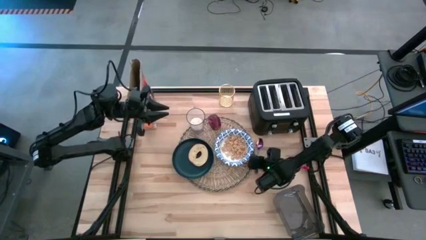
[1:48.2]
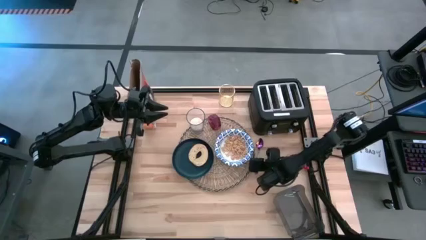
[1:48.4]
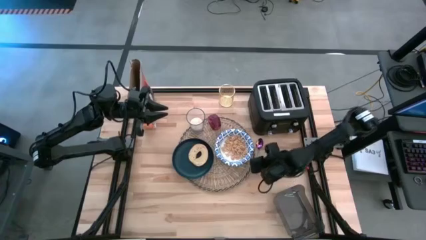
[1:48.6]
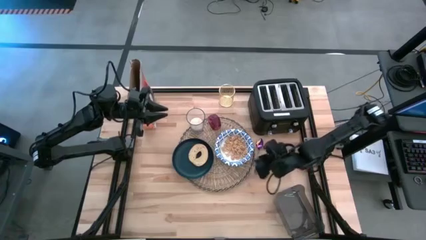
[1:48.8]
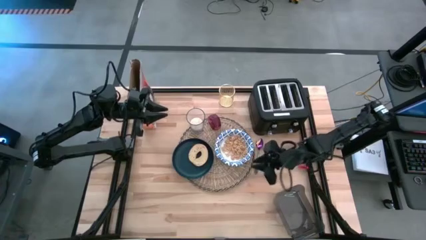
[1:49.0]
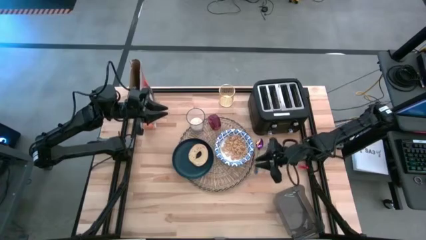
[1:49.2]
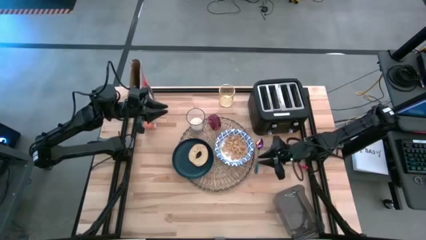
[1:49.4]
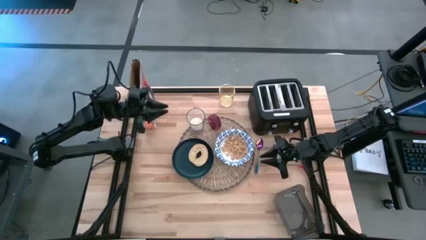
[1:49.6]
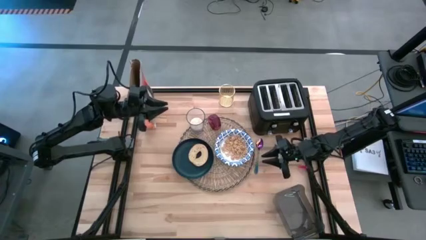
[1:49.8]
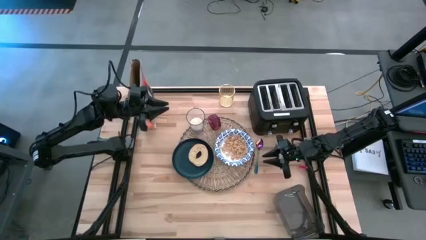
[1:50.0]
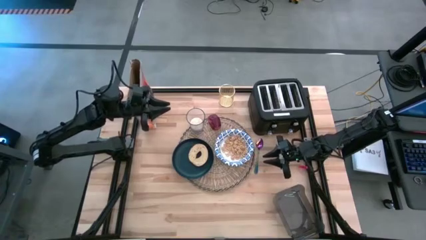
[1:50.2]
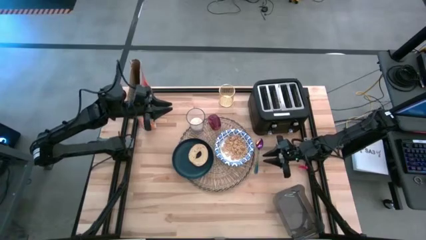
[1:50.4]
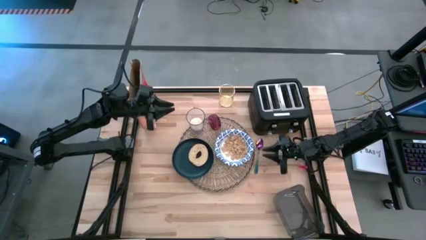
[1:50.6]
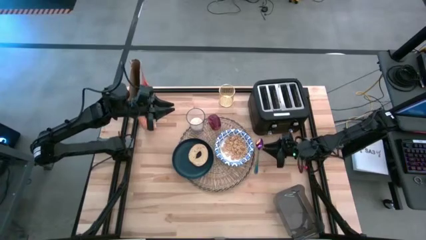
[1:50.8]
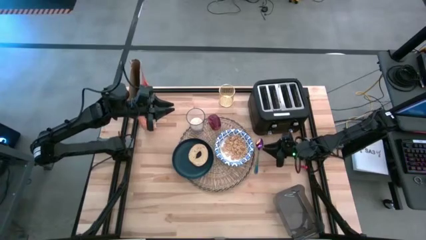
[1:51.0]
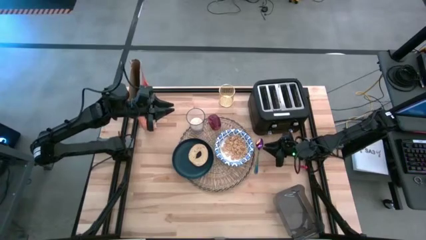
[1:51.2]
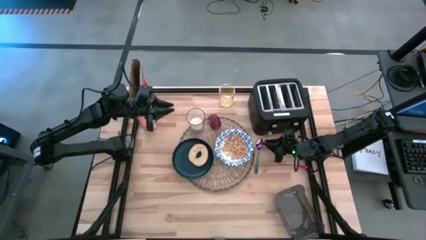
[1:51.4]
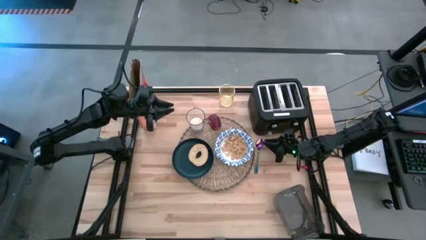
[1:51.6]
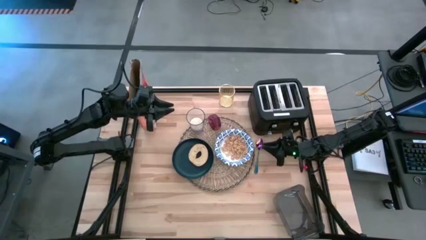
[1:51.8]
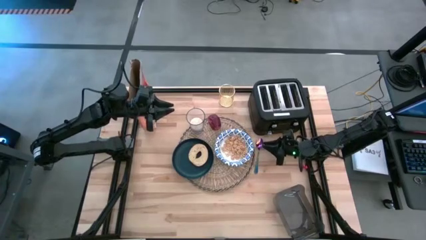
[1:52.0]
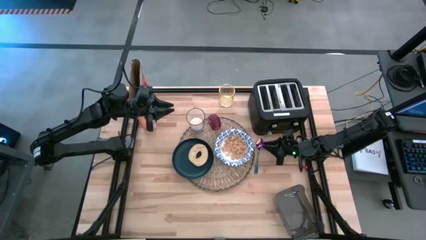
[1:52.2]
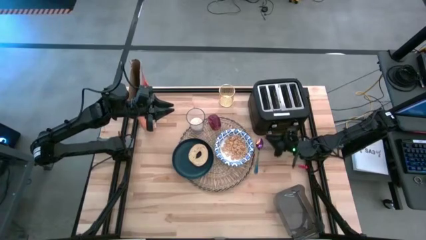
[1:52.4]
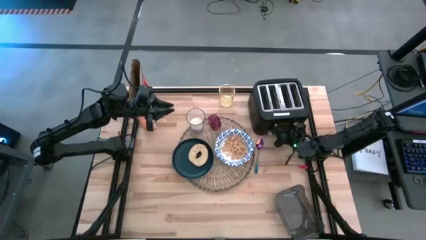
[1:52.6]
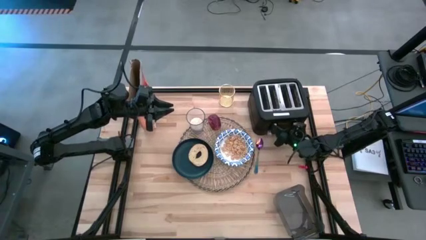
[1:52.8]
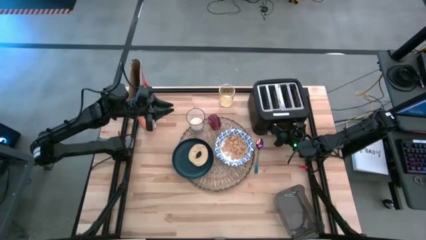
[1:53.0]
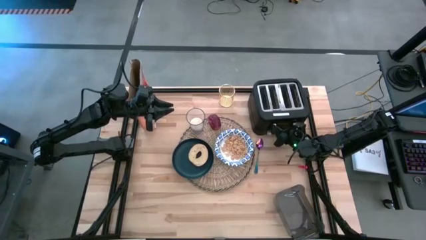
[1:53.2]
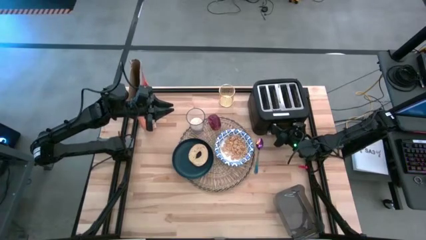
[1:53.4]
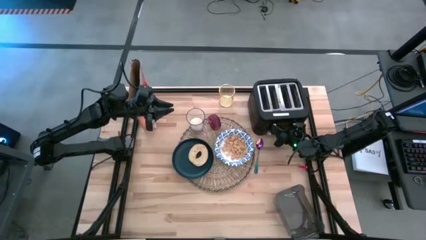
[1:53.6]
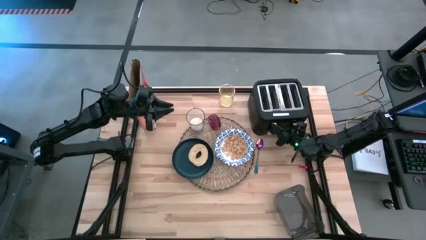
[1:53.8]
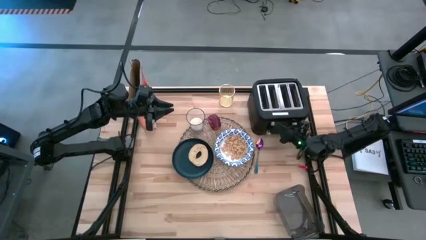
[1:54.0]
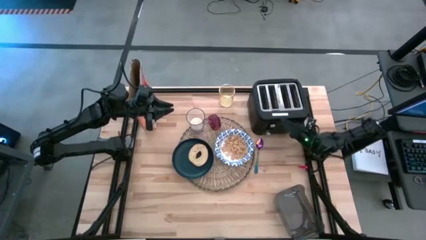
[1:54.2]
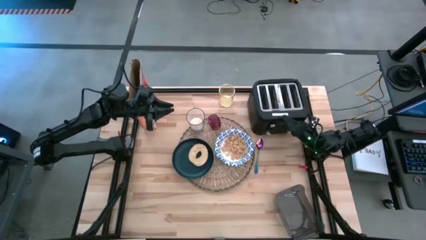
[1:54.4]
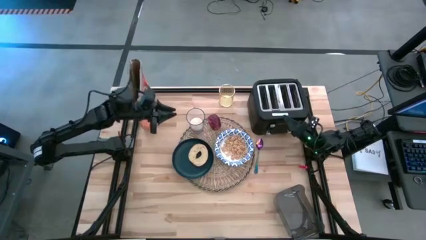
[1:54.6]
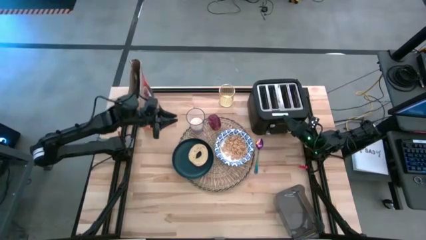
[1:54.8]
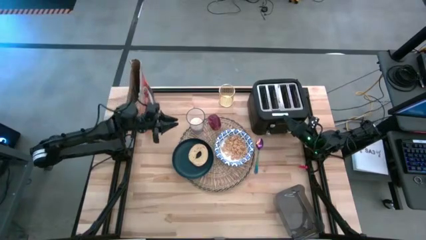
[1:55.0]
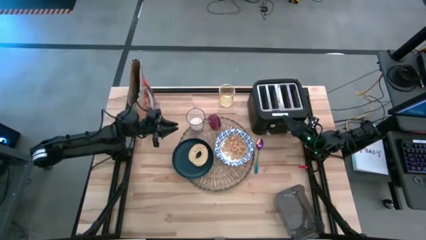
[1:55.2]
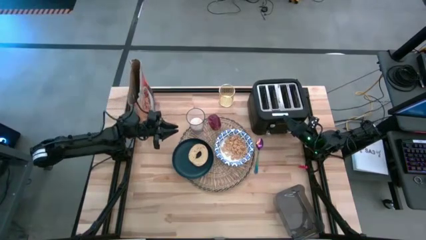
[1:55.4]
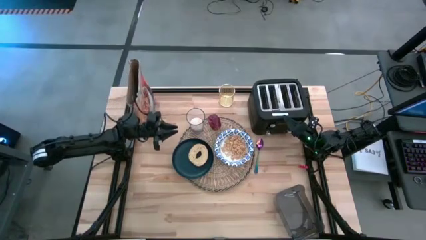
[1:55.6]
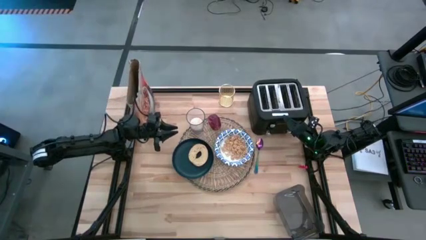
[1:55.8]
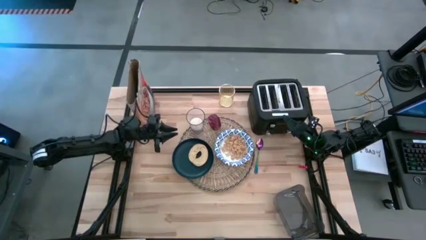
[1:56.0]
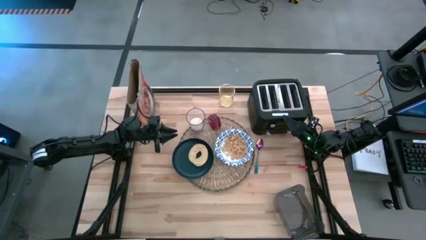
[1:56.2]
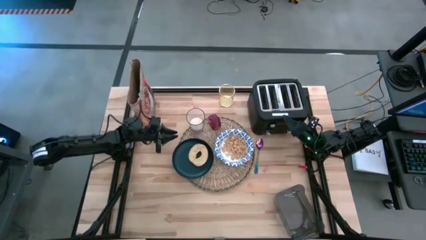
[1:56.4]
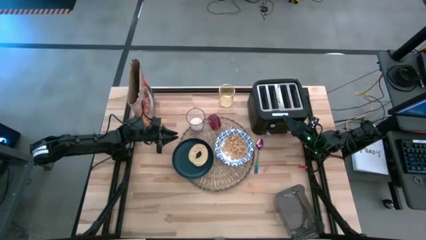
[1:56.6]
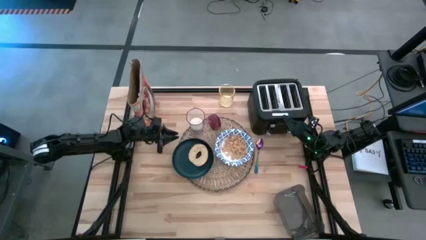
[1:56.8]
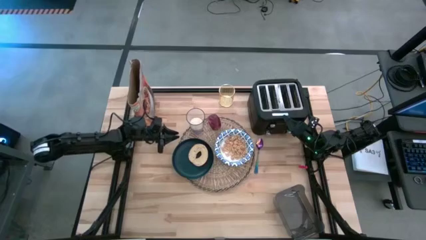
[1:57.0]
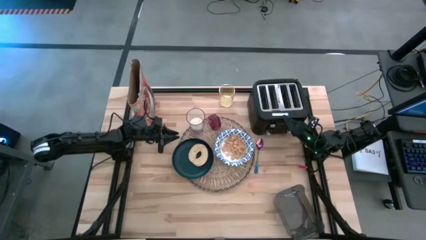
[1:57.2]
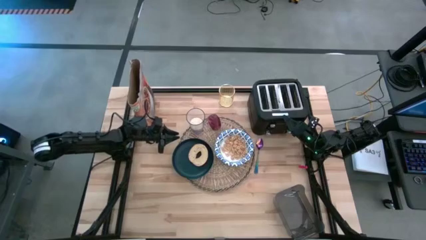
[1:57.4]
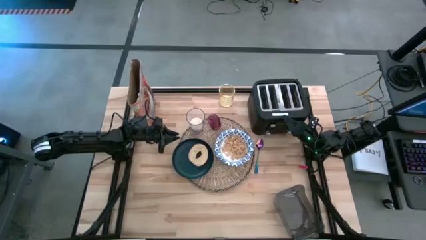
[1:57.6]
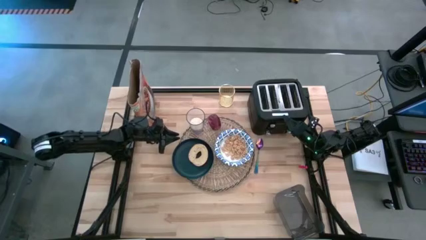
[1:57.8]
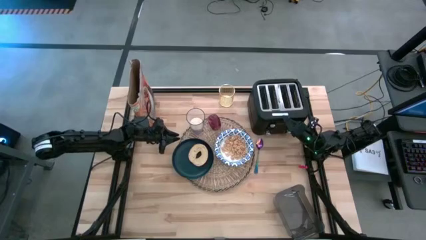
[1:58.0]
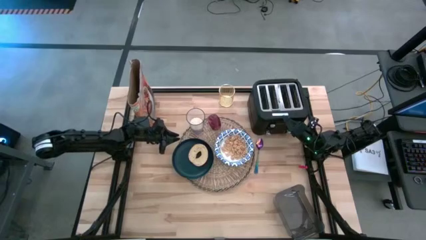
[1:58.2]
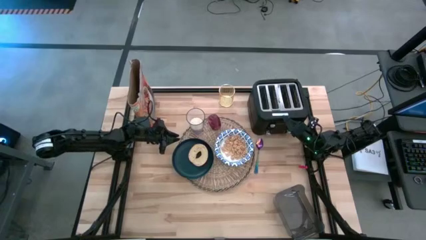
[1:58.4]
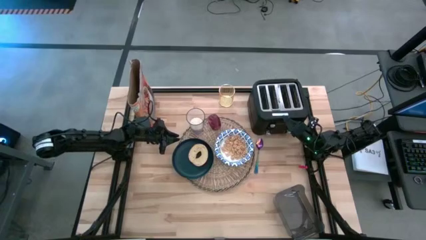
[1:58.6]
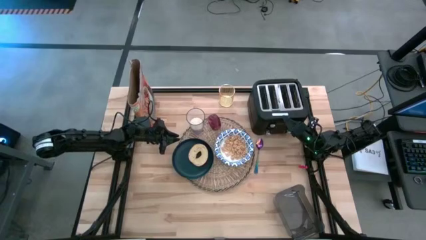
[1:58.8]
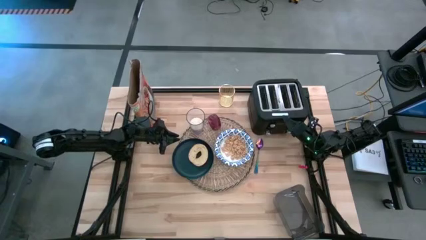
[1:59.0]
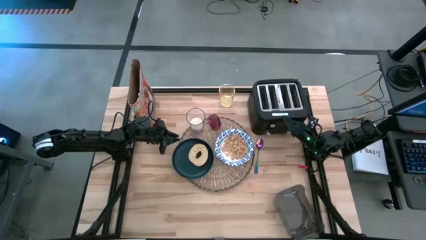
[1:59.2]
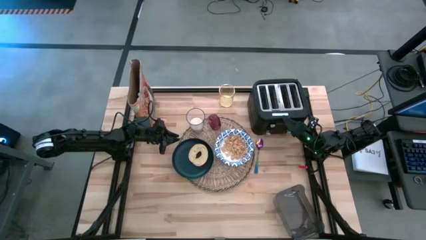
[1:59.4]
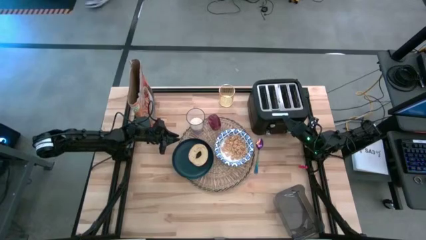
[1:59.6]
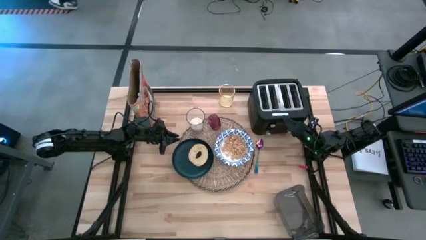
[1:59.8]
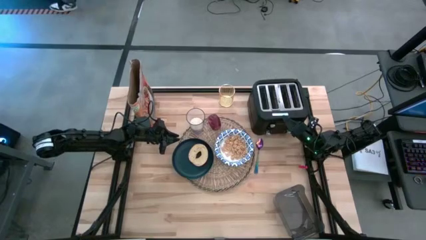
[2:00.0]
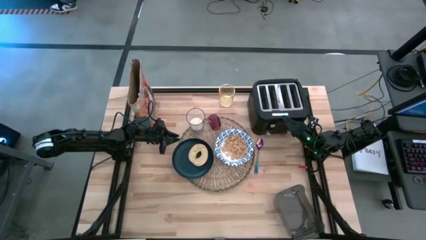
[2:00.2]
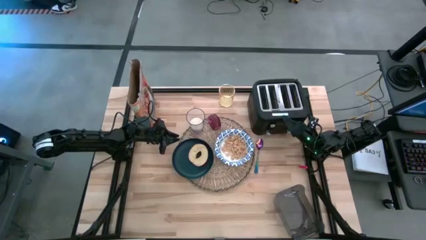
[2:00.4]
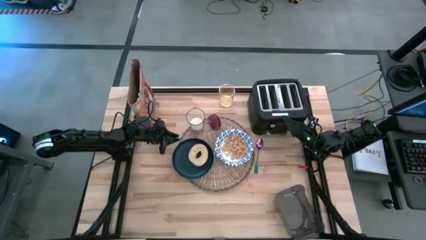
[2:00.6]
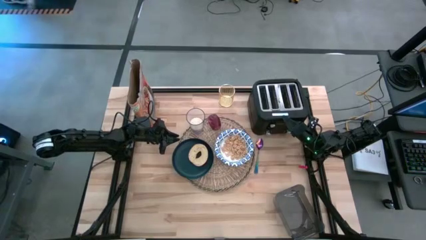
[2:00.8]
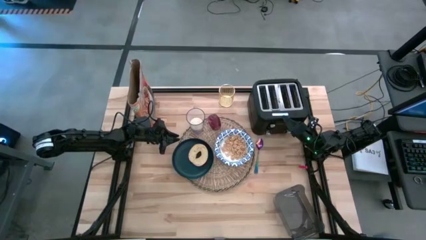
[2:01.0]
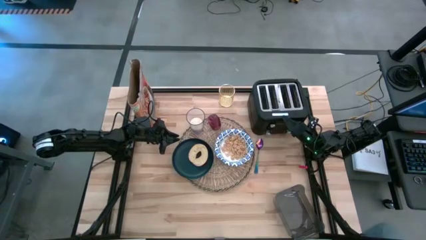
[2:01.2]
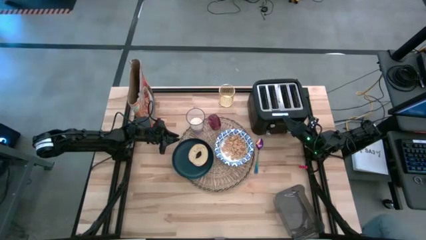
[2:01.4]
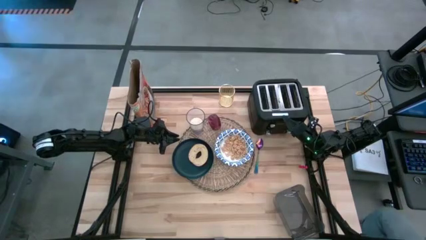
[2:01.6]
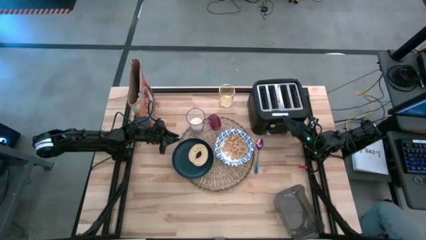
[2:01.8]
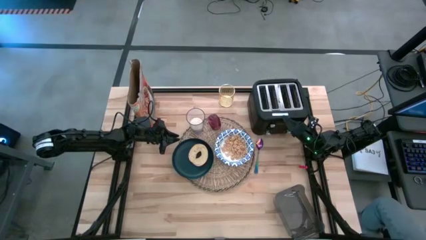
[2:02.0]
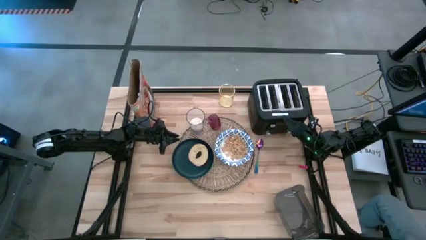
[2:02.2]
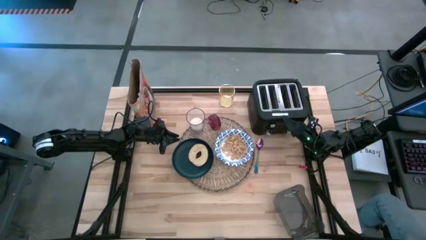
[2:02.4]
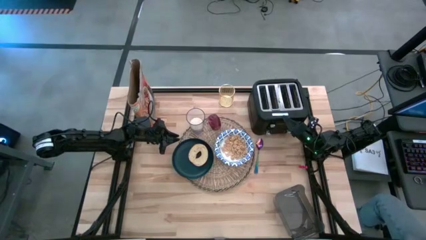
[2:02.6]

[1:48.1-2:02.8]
Task: Arrange a breakfast setting
Return to Home Position
